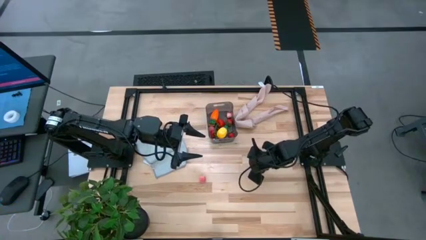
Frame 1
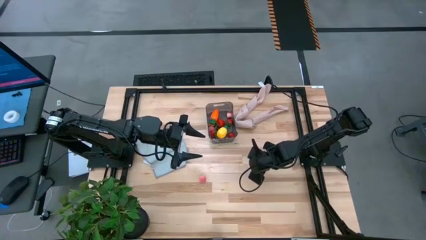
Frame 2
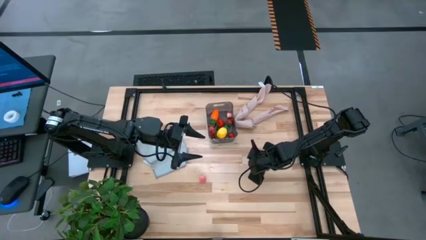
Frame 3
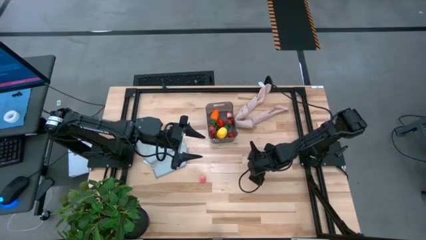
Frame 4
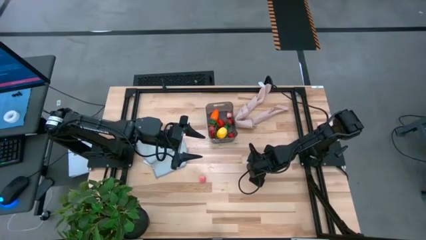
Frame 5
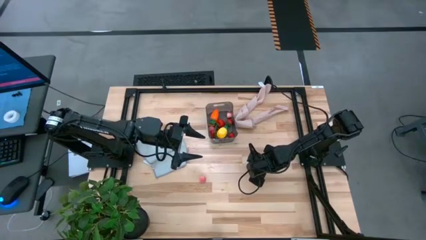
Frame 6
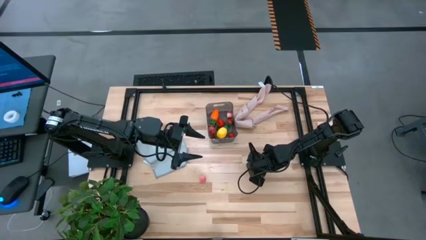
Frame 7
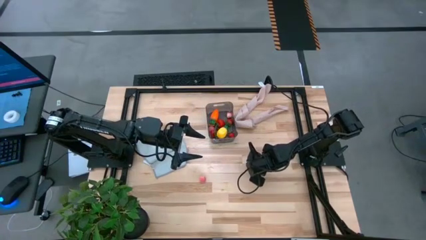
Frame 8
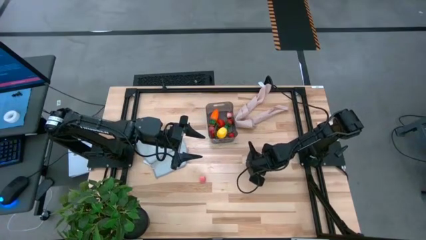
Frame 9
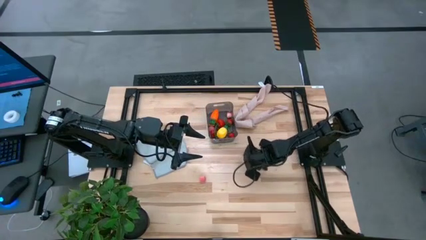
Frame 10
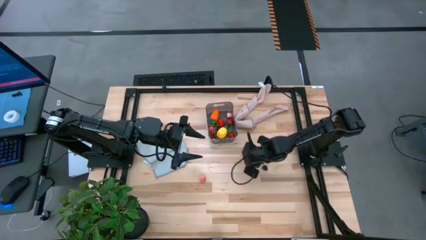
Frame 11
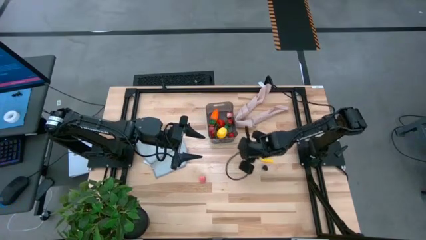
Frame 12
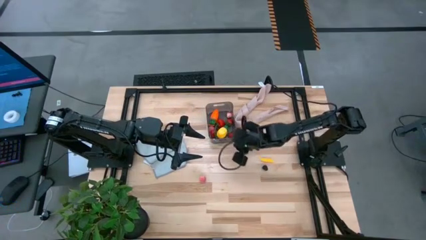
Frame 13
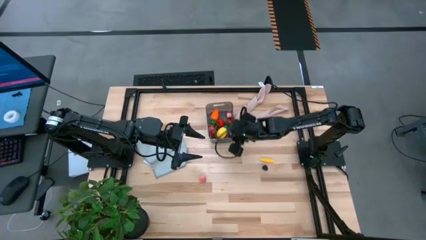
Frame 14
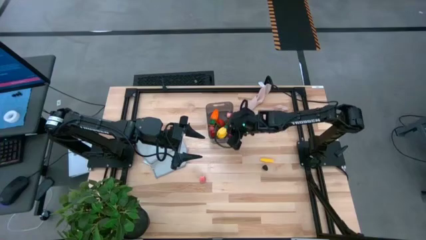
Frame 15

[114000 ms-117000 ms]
Task: Pick and placing Produce into tupperware
Put the blueberry into the black bin

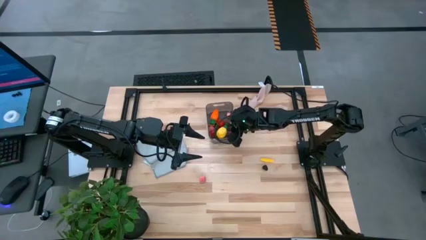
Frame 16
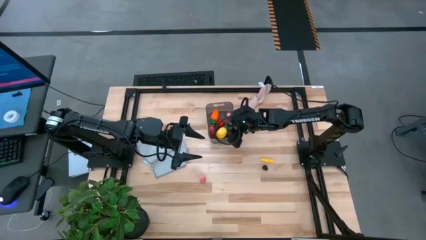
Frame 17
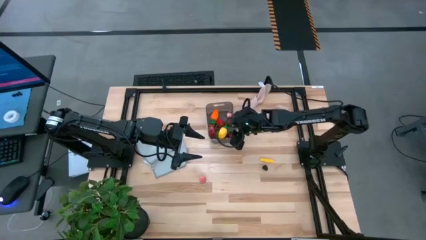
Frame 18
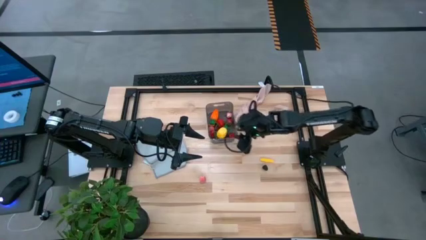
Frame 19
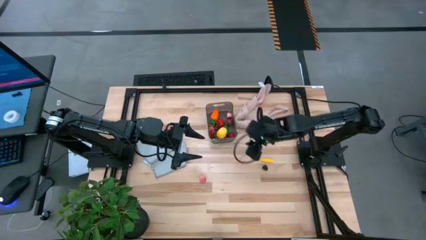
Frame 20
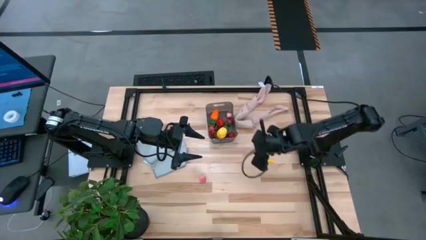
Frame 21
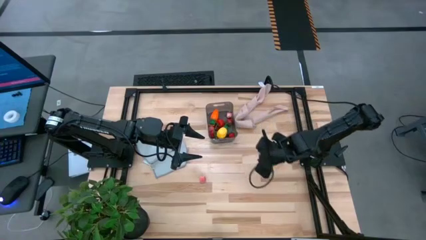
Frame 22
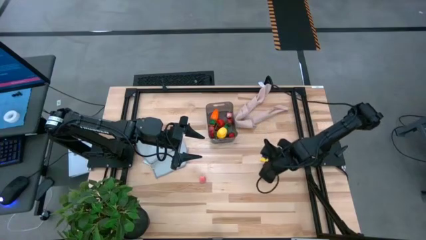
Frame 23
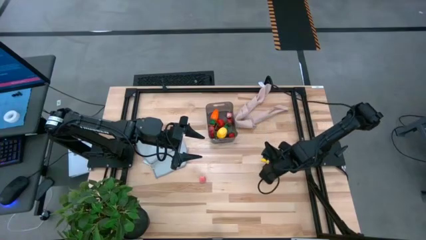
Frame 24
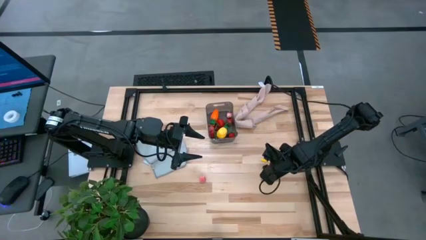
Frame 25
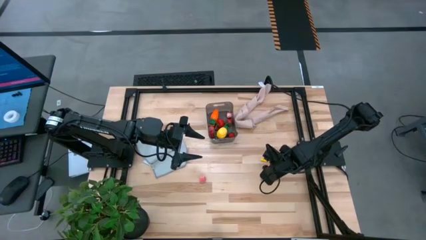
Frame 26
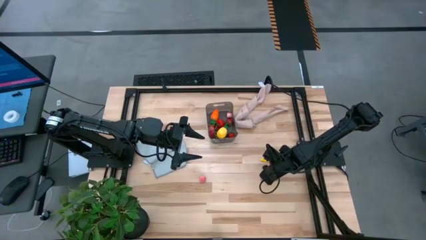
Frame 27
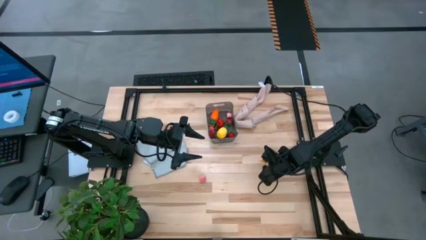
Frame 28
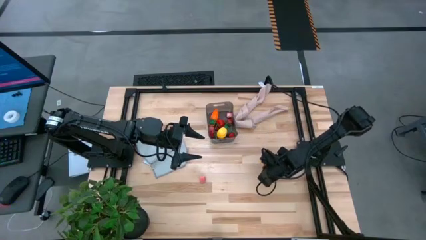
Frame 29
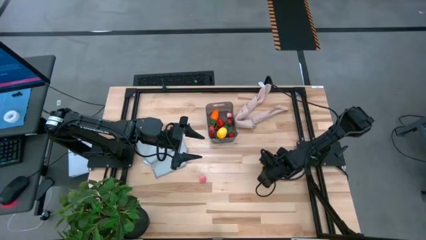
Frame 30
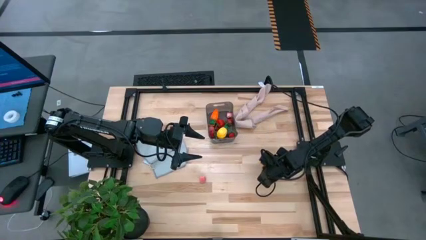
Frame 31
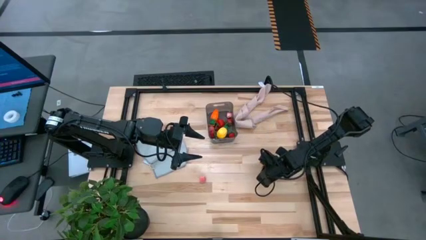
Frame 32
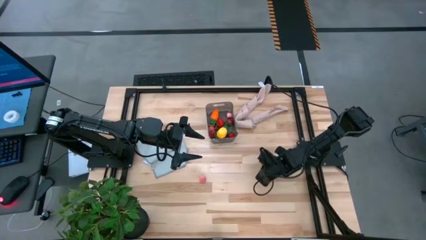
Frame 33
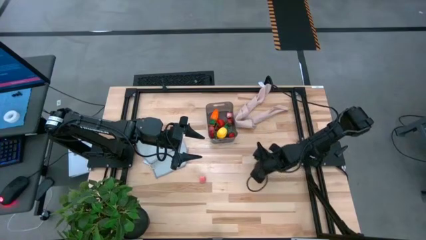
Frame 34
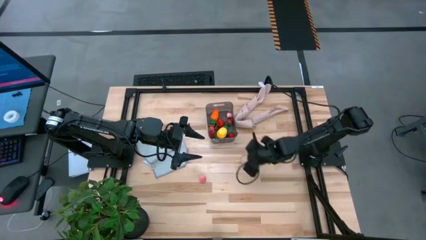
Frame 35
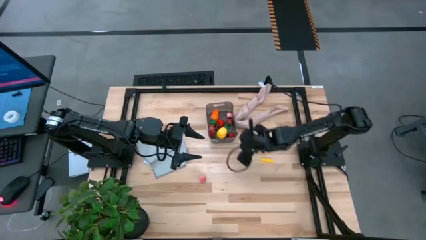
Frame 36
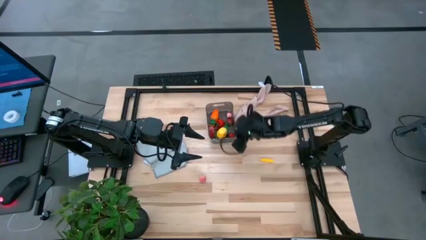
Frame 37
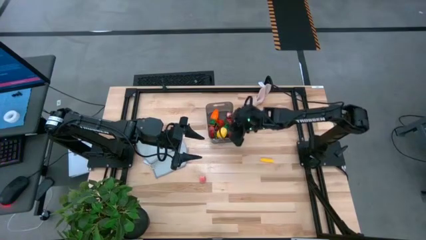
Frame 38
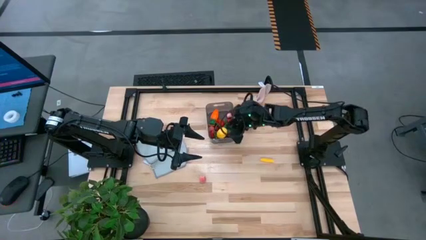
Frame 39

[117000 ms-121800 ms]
Put the blackberry into the black bin

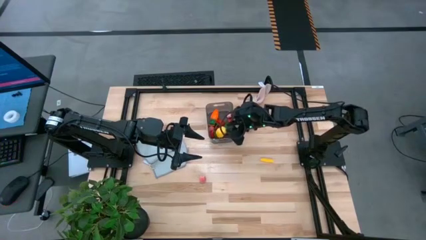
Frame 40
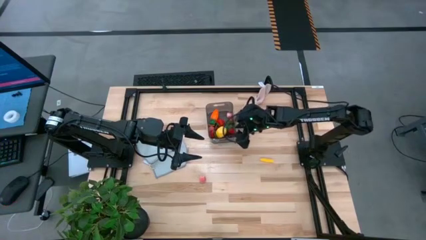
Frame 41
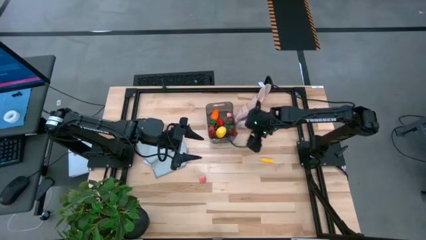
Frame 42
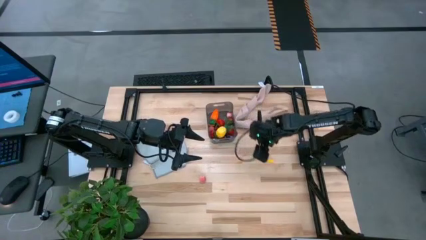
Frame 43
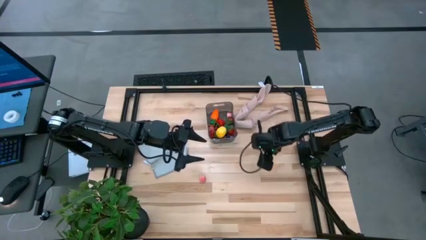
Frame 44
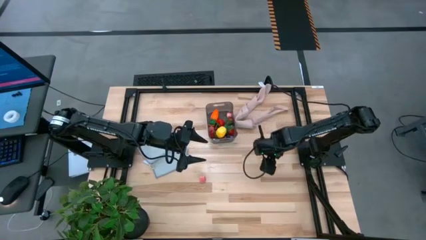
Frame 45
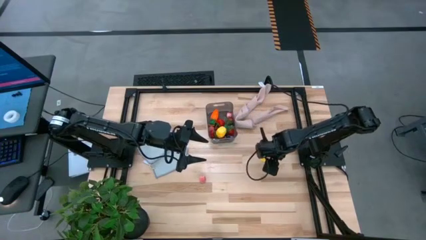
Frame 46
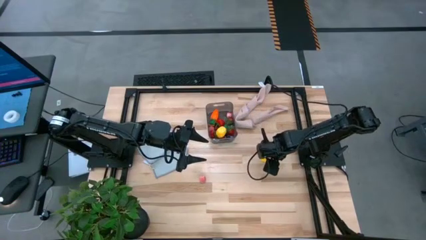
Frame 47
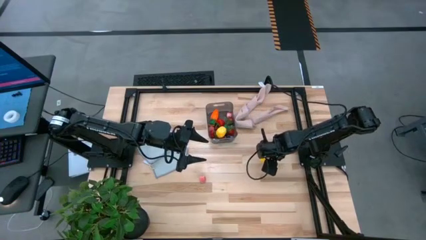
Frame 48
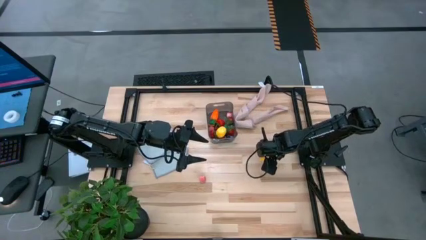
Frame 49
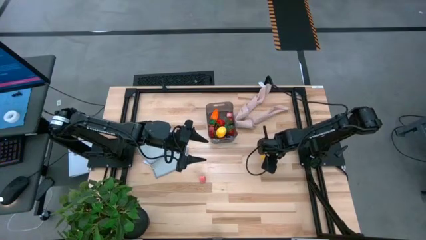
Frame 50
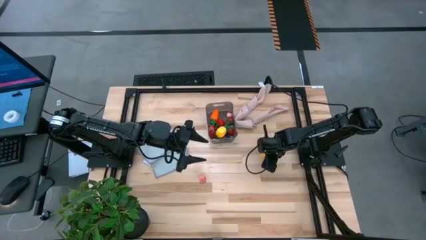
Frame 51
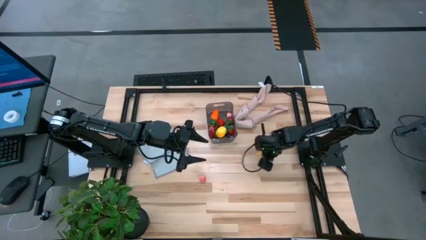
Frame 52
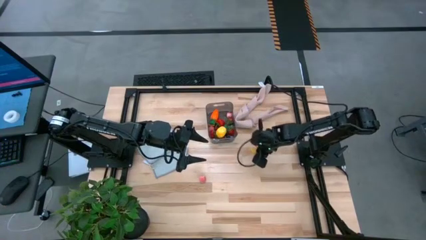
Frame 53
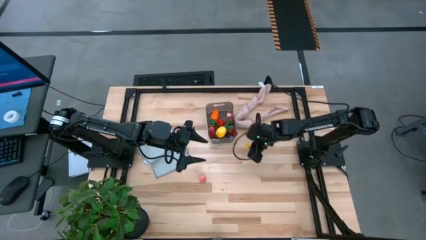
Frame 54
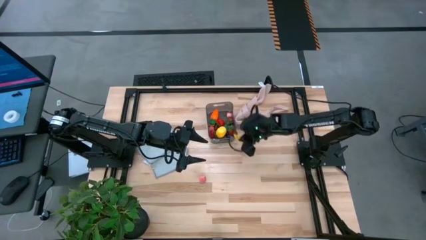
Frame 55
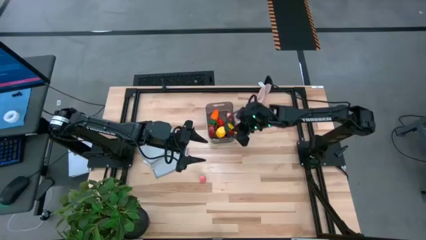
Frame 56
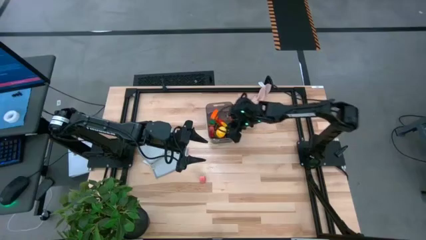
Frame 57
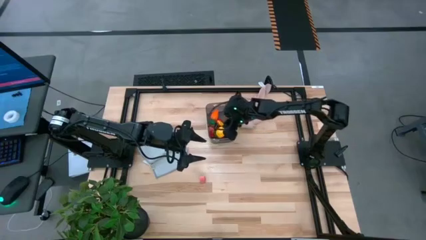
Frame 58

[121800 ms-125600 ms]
Put the yellow corn into the black bin

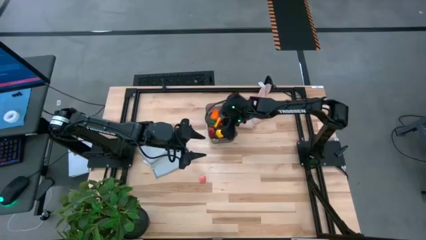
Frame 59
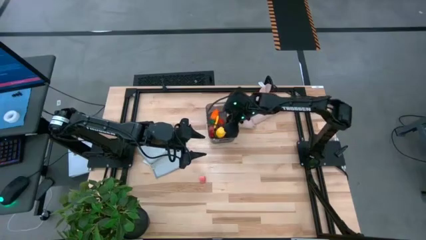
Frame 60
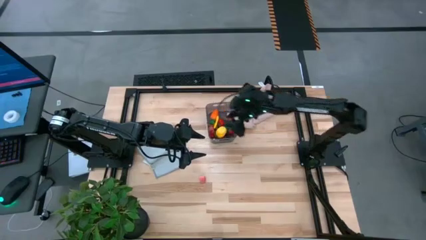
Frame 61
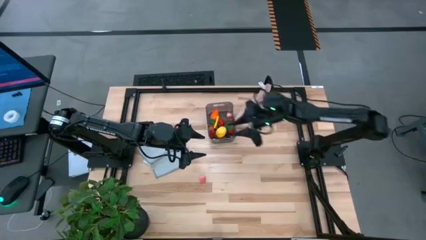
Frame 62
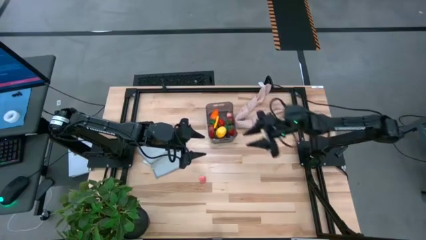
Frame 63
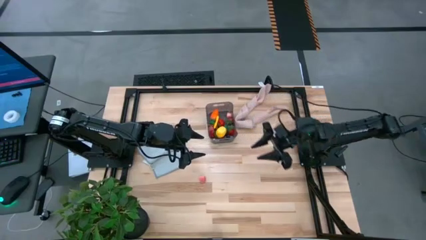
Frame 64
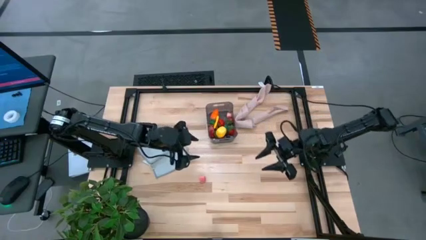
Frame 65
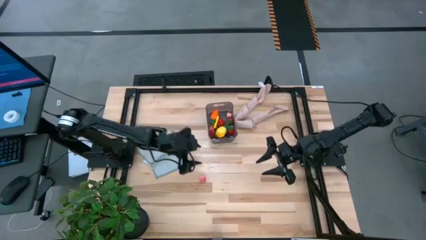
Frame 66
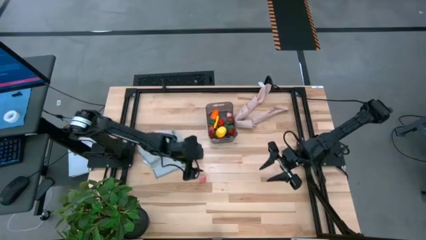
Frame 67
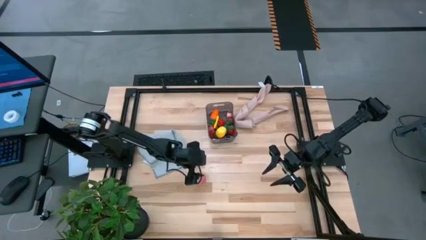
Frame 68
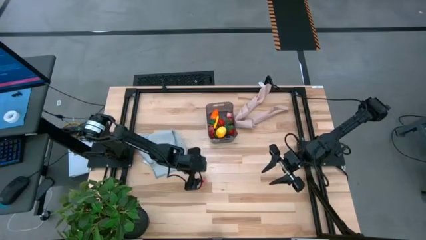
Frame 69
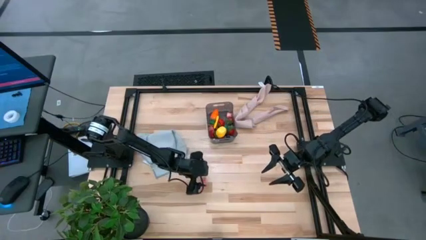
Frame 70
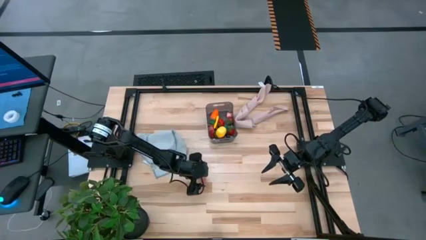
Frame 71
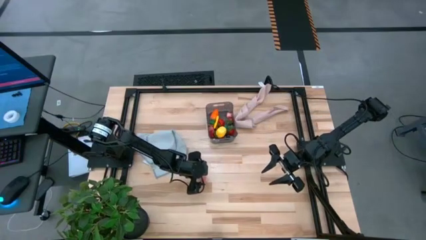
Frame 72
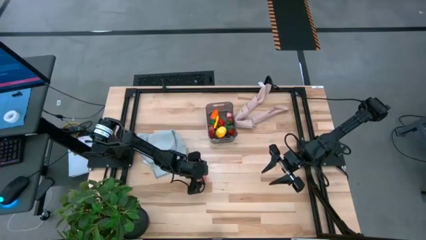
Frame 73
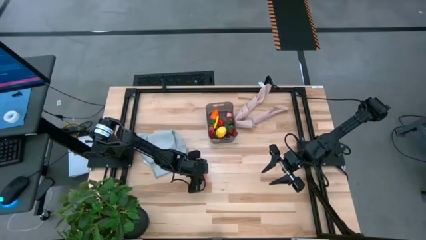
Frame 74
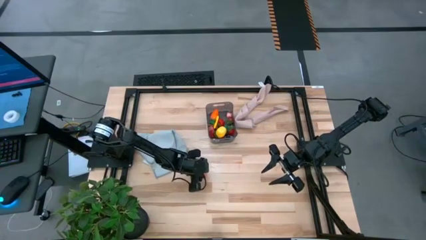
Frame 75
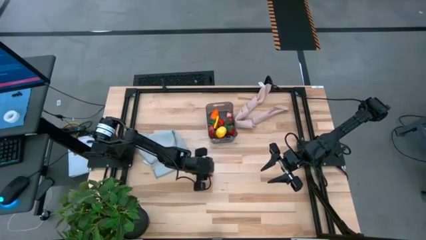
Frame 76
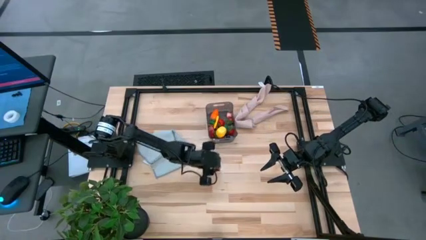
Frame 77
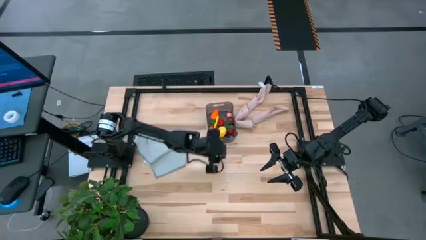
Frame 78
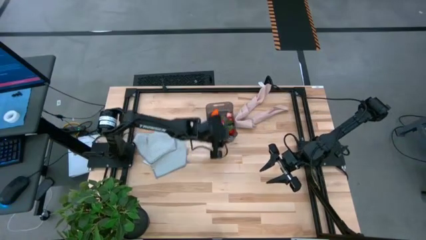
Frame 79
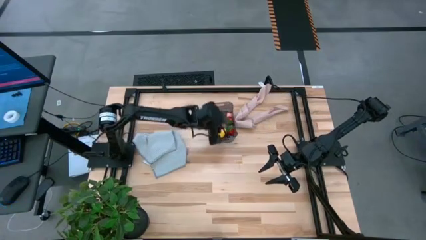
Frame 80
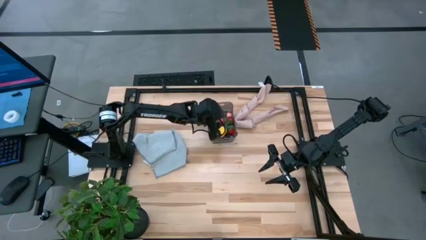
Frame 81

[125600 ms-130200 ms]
Put the pink peach into the black bin

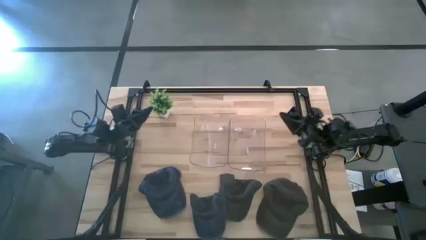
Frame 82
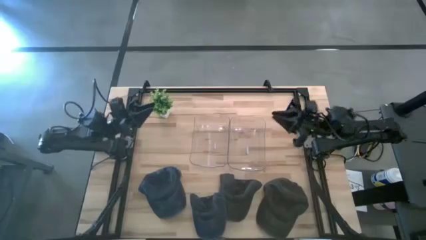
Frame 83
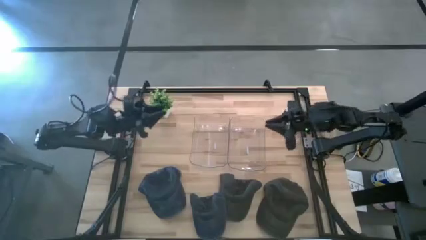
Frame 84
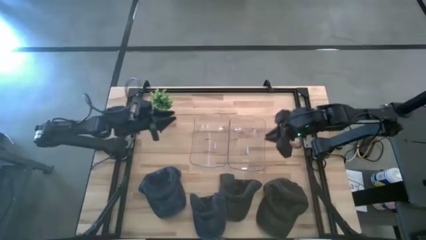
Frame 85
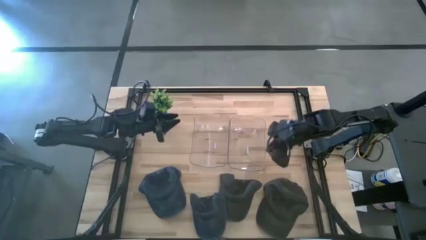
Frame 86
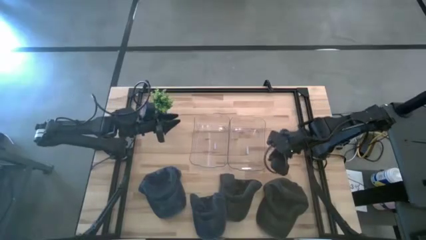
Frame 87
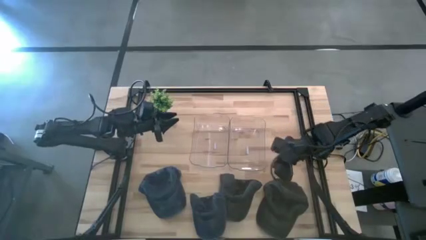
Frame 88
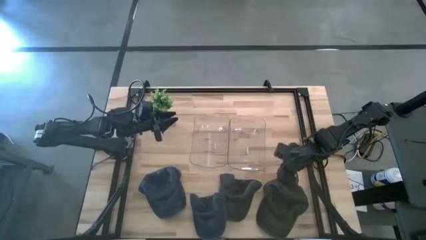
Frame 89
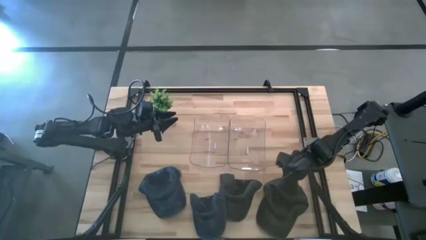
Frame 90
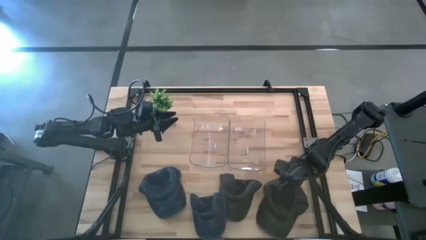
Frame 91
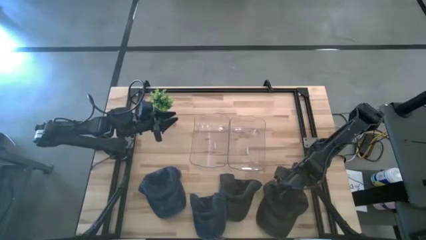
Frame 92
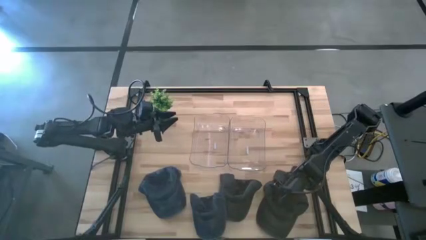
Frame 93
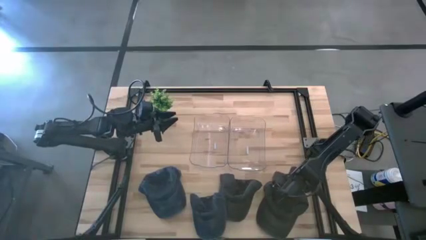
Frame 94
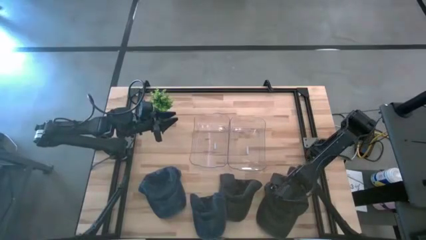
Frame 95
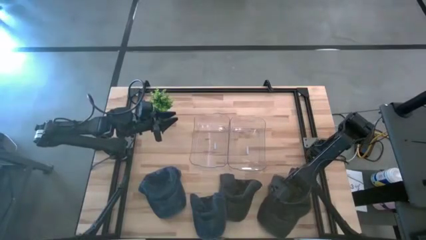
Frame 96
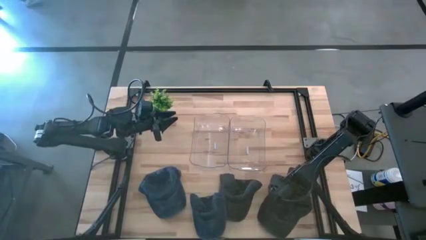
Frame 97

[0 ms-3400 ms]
Task: Pick & Place hat
Put the right black cap into the right transparent bin
